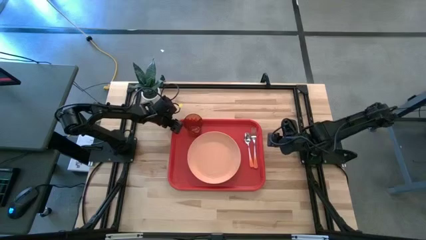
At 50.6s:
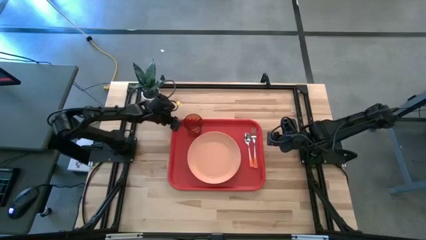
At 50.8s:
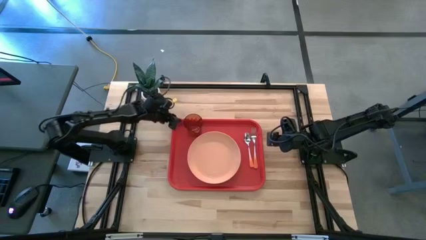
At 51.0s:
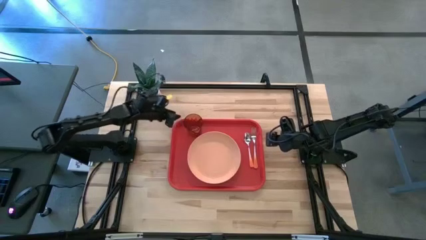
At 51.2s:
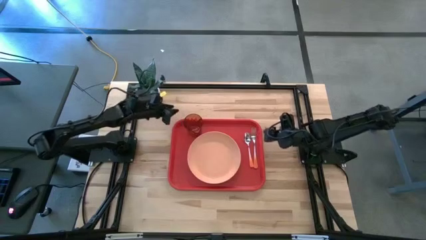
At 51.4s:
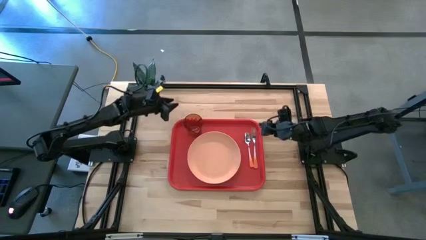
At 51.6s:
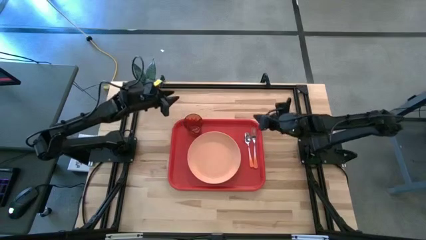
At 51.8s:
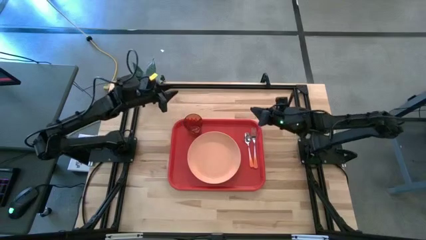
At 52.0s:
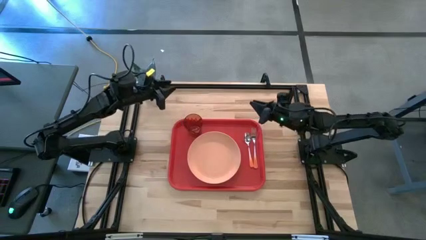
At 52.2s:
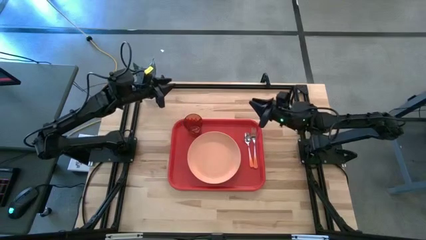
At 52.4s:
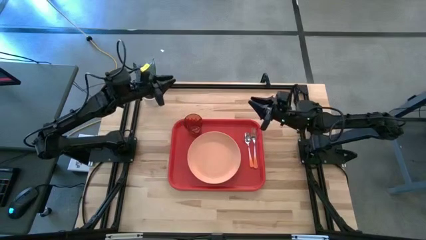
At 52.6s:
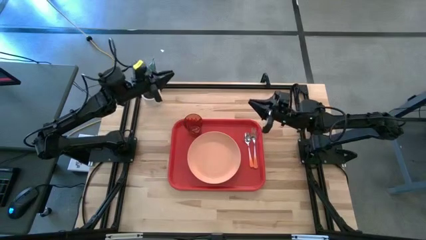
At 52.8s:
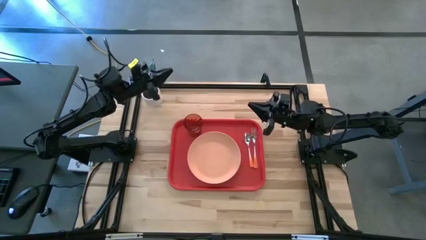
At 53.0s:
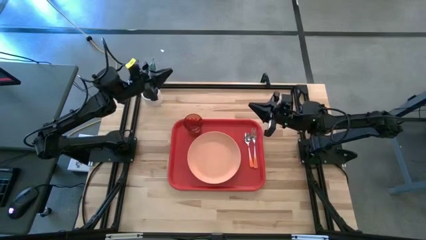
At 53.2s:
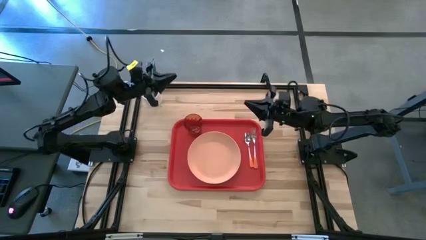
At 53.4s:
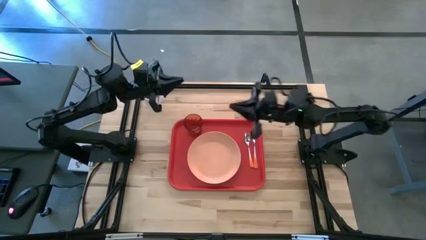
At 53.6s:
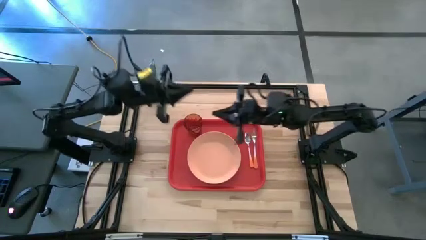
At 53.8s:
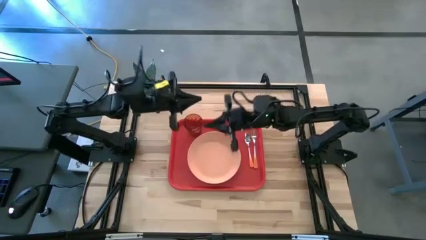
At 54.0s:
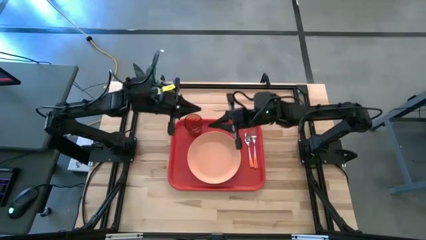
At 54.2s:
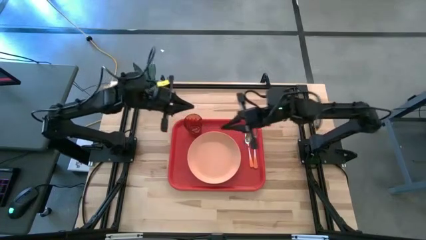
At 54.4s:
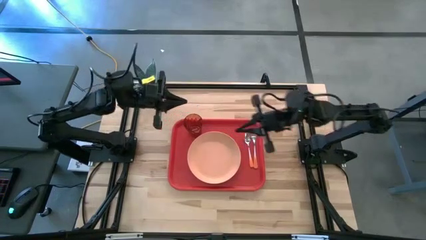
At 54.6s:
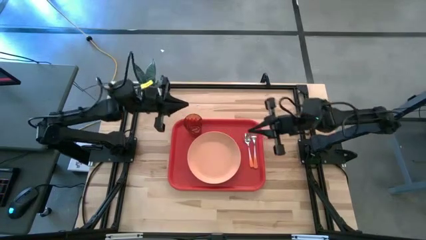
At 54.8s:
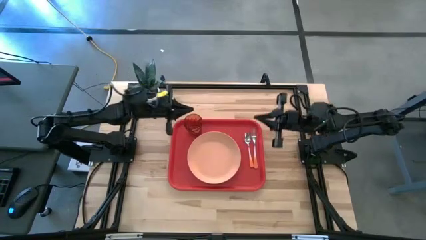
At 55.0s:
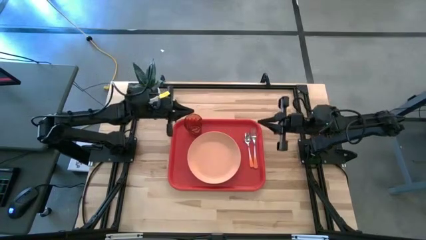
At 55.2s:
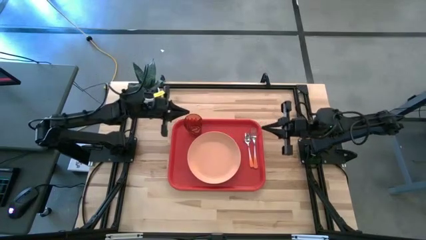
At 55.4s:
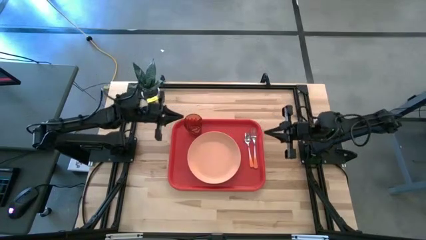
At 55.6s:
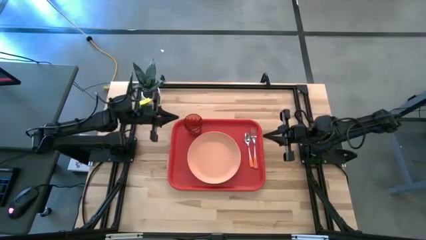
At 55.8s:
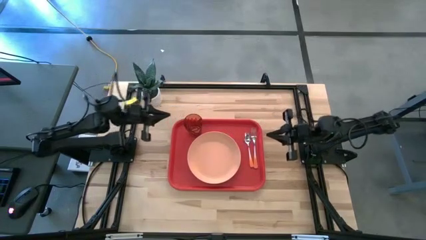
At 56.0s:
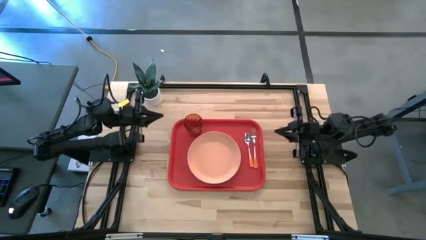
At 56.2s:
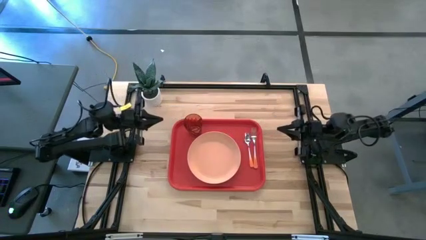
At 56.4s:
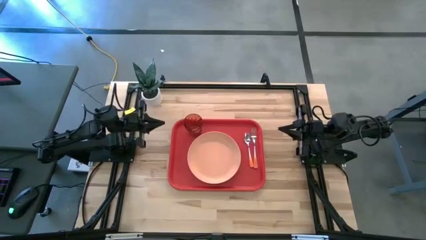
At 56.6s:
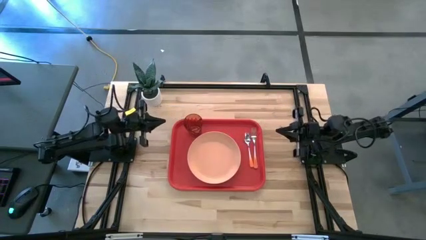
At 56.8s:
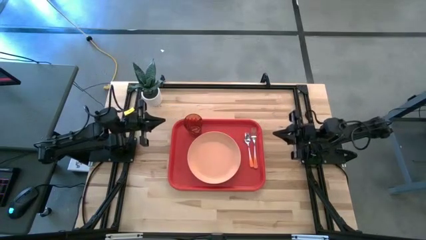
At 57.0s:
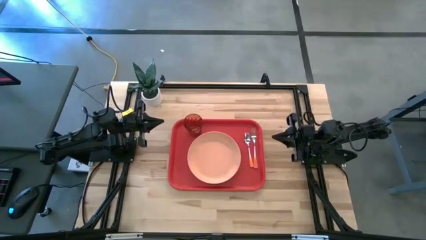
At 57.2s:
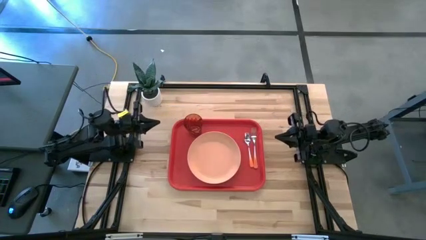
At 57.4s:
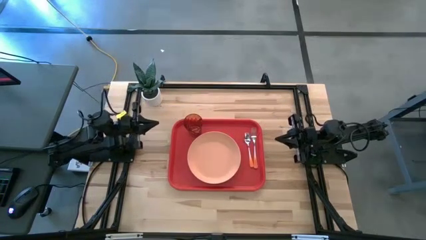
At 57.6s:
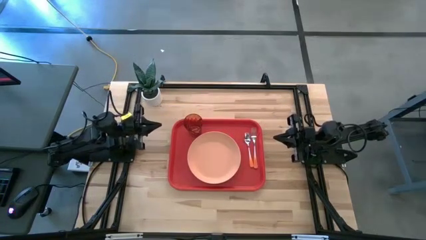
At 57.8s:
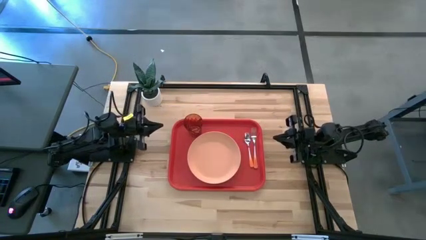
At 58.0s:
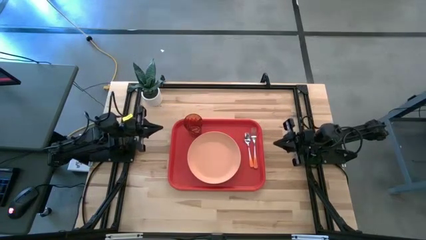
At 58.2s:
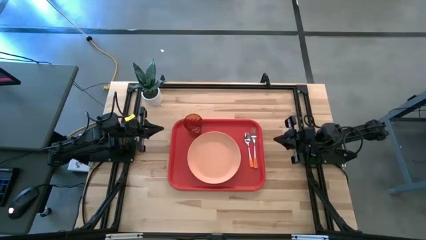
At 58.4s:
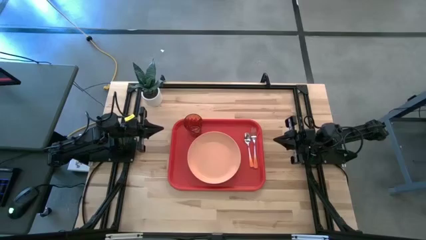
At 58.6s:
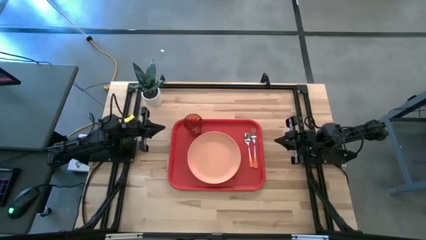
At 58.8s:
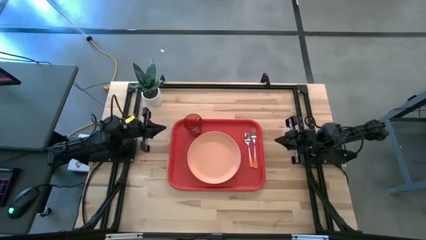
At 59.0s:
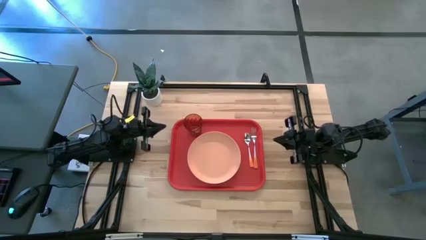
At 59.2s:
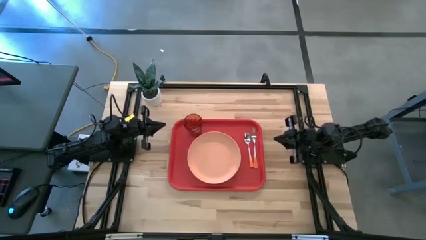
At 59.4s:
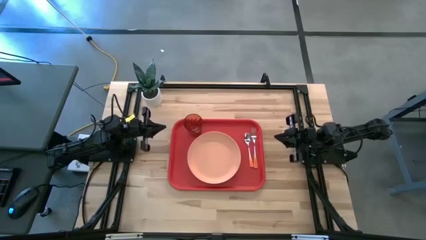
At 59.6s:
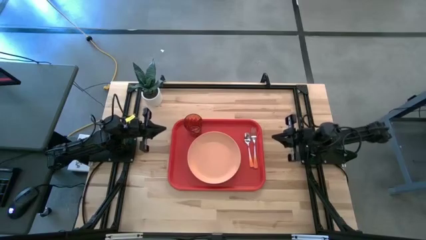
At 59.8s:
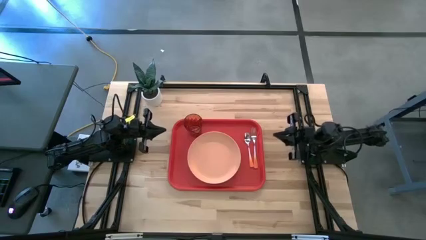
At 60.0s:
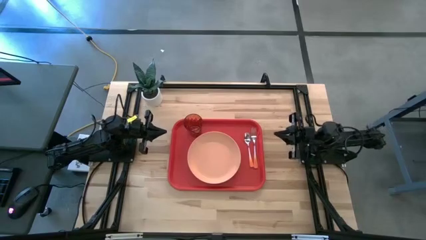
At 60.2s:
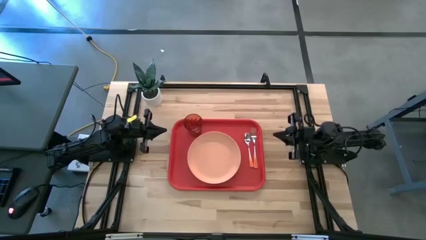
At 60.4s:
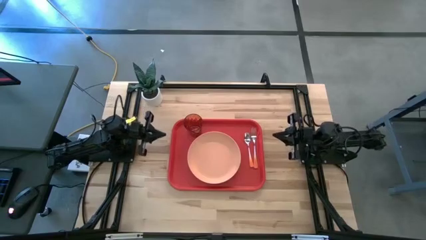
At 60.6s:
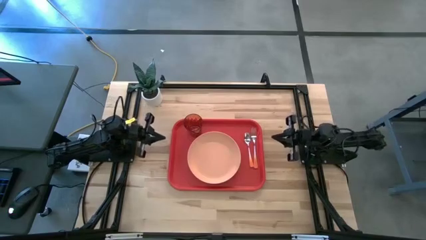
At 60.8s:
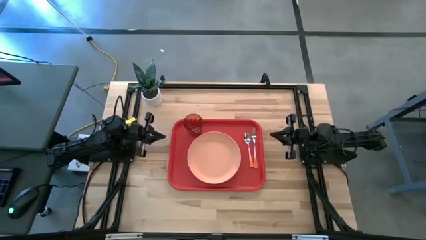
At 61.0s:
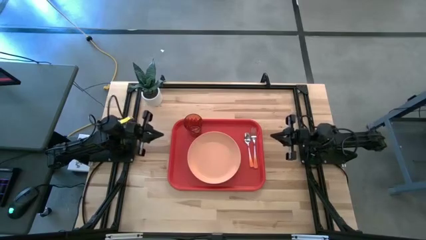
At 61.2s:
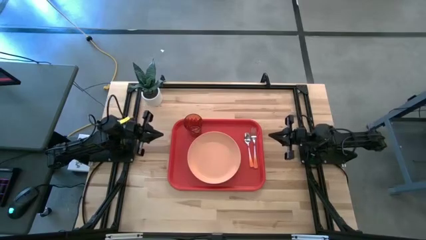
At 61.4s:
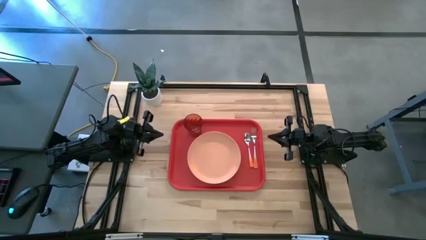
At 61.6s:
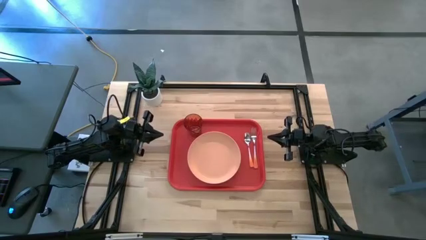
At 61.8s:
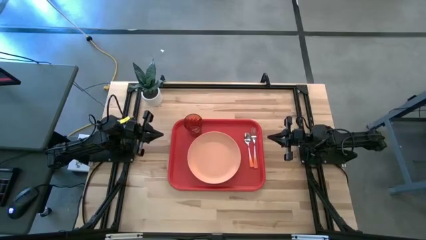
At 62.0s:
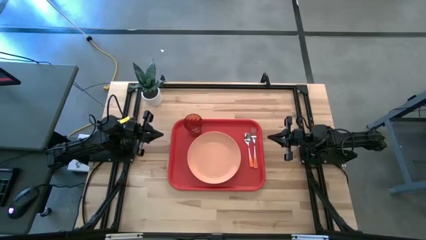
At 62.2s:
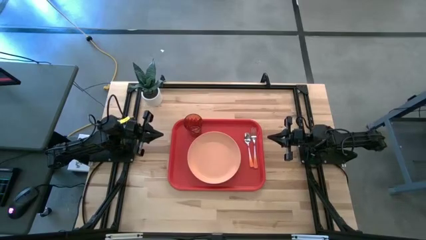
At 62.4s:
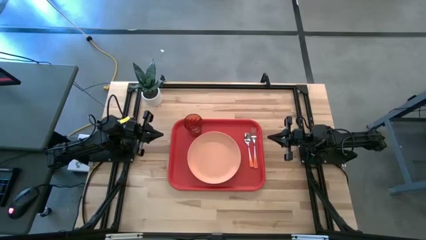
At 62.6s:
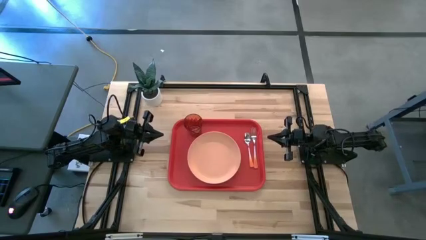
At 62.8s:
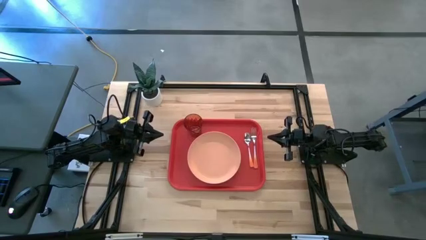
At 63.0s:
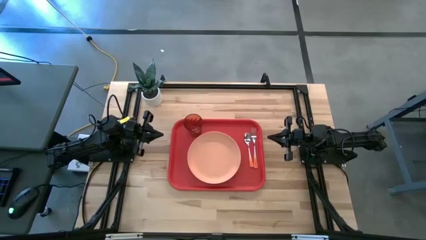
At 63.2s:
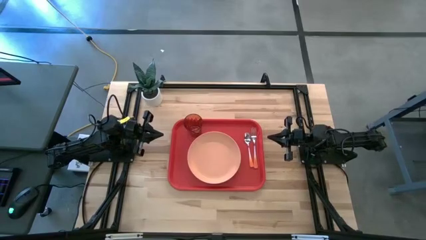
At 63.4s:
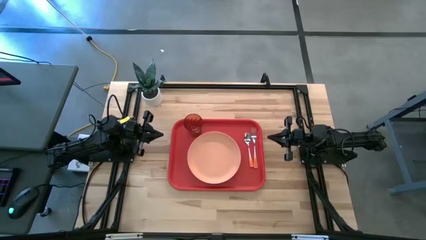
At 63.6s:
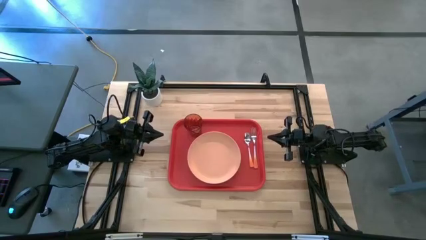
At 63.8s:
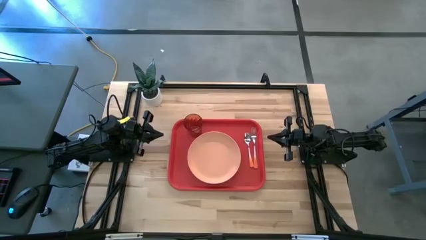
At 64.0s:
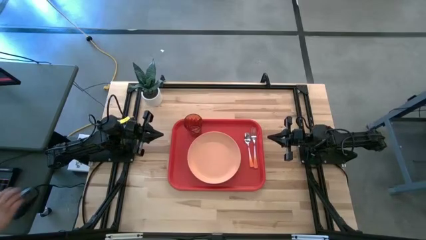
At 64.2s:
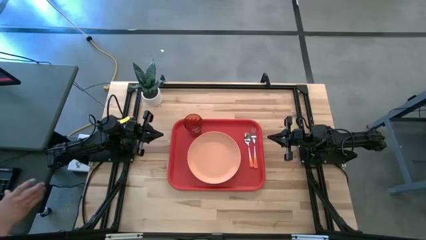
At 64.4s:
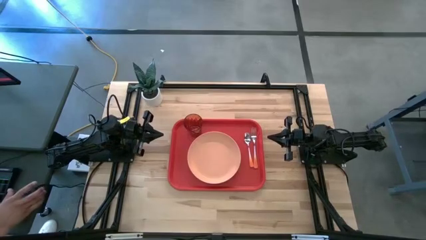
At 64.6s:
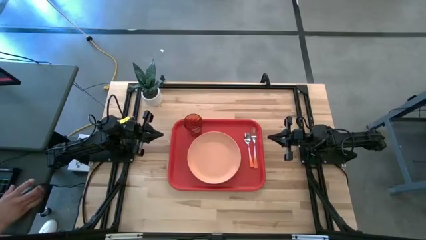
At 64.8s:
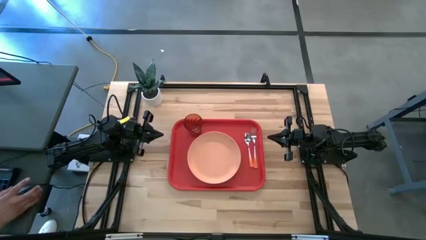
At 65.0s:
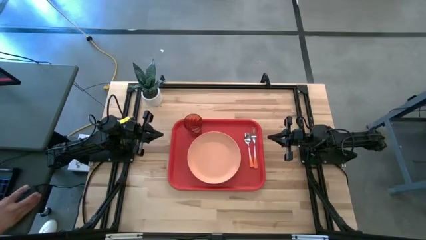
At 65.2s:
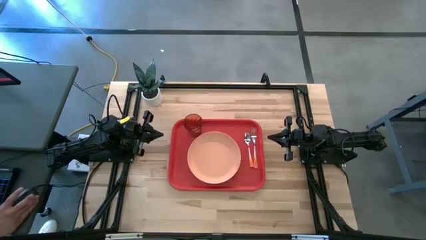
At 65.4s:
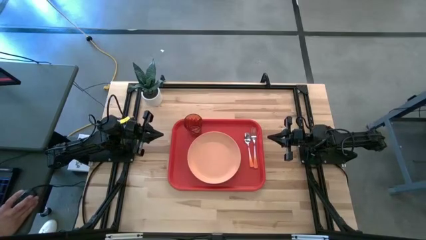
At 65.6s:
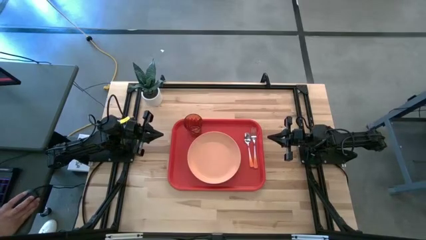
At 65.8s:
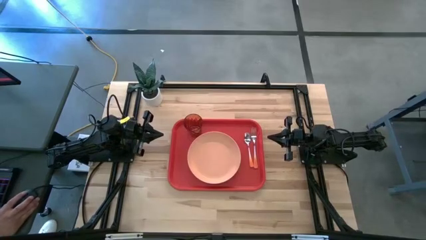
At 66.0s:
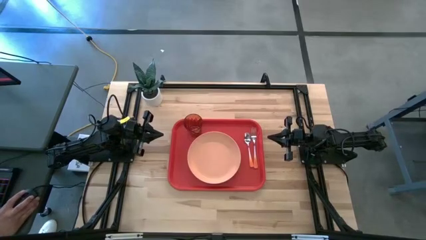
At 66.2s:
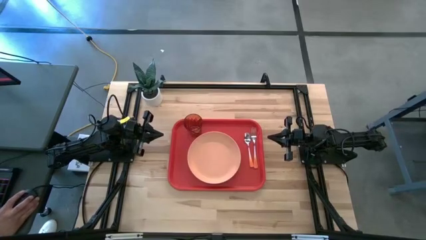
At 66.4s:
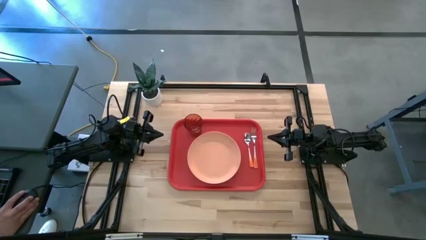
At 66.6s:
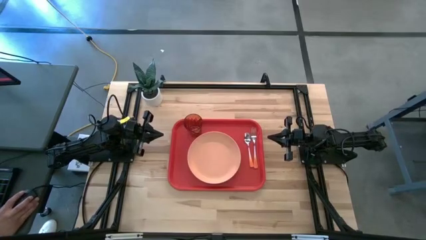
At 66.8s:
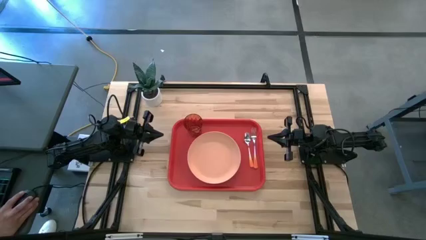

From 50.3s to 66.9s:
Task: Pick and place plate/cup/fork/spoon on tray
Return to Home Position
